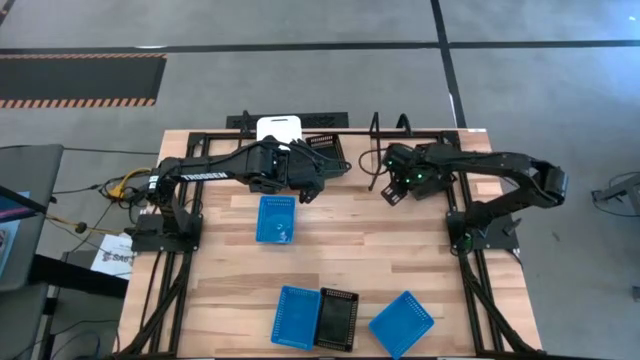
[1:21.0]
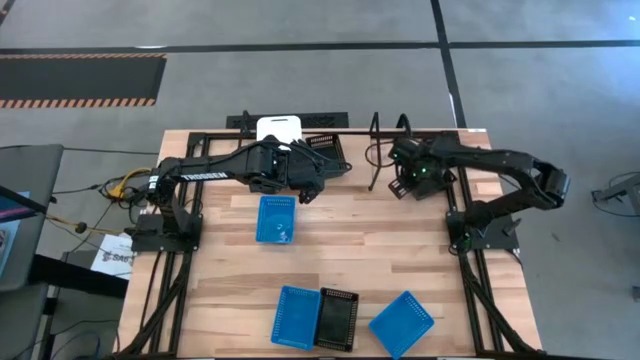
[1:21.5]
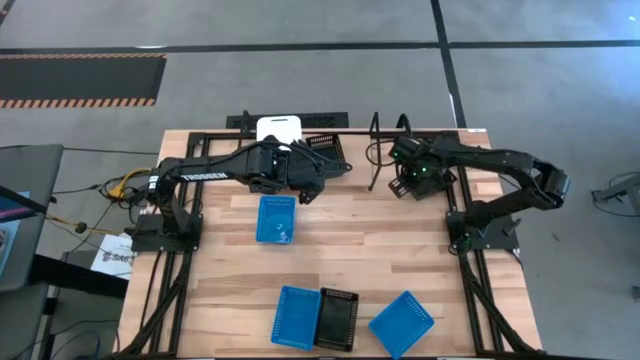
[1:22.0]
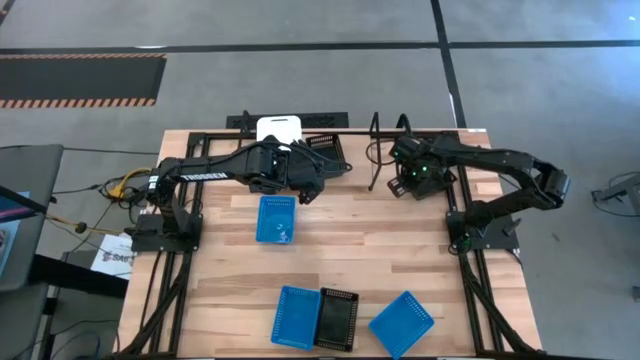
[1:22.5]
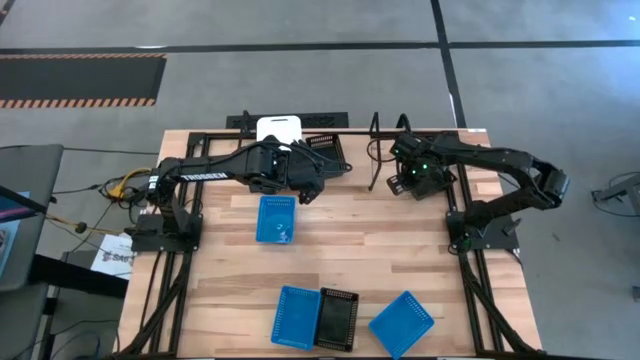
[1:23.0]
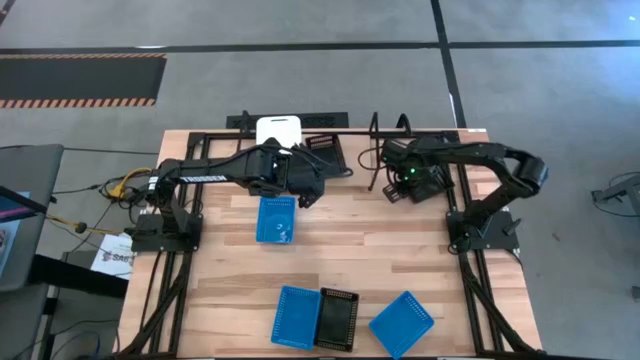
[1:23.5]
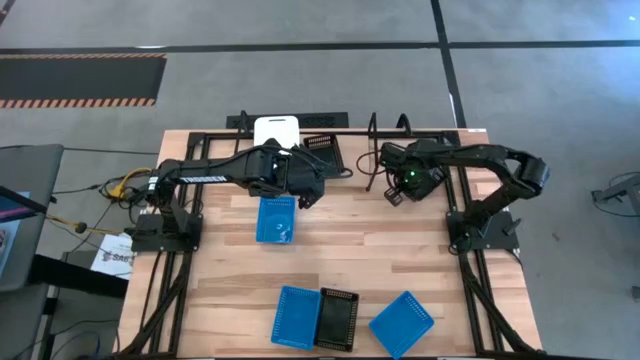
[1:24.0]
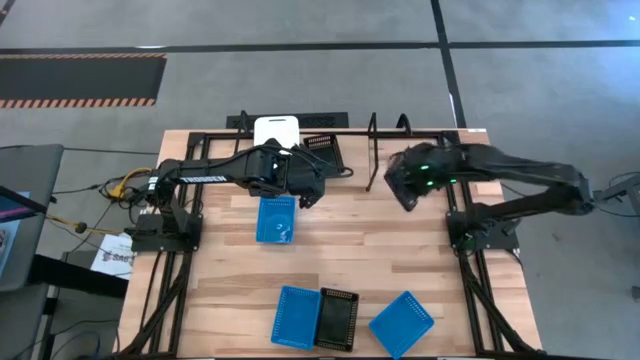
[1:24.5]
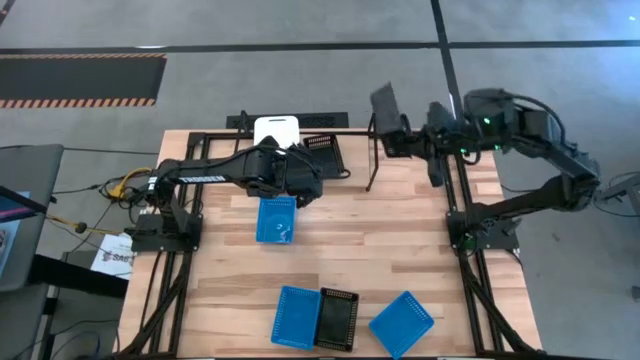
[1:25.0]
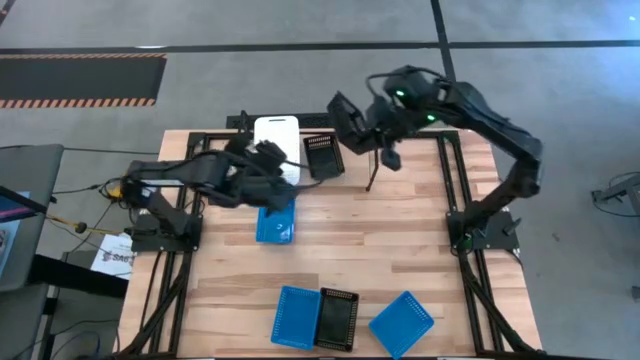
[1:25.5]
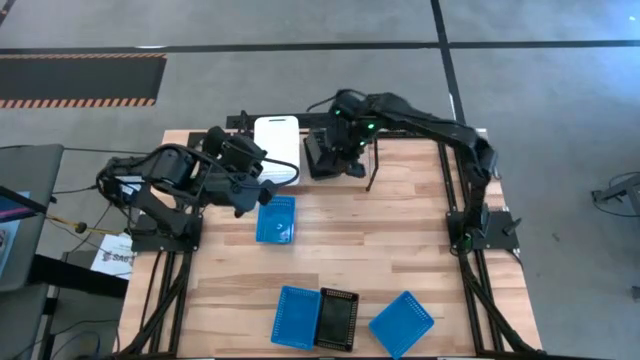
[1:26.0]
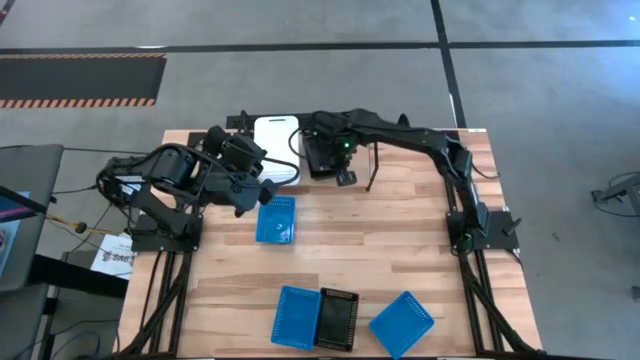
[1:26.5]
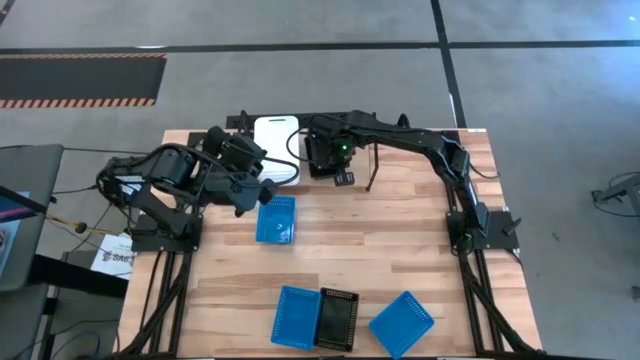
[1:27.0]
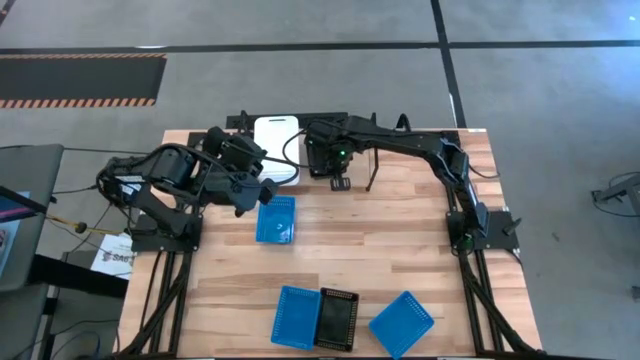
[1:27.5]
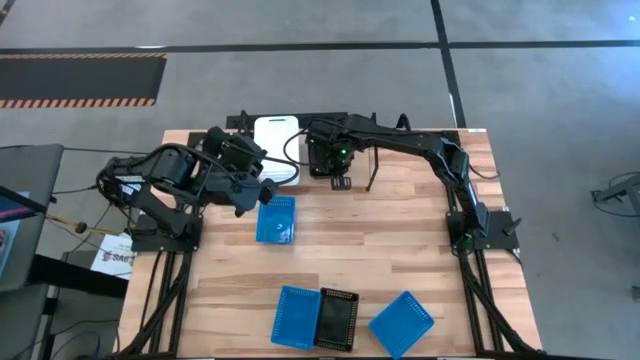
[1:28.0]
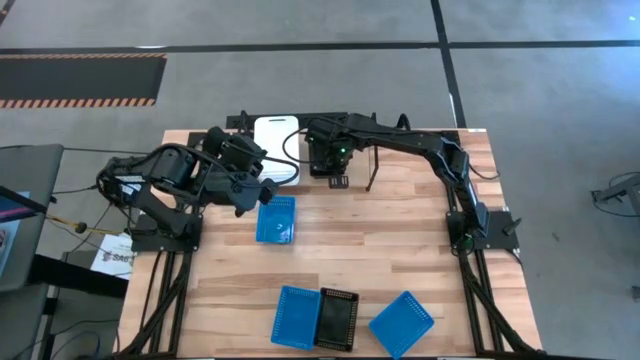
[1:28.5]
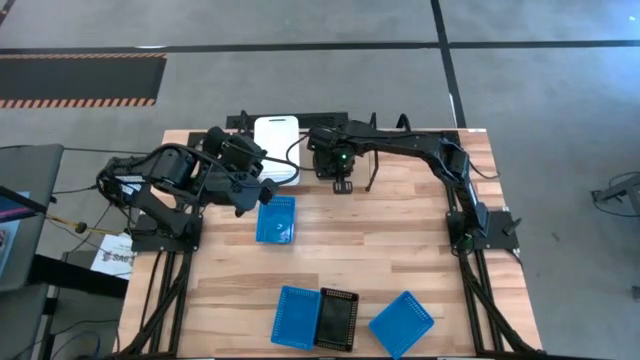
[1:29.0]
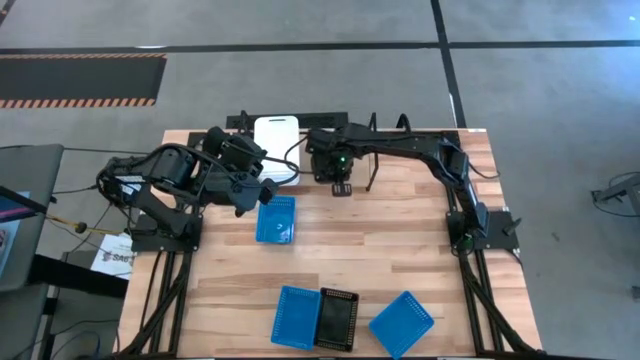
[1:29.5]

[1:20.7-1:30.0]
Task: Stack baskets on shelf by color
Stack the top black bin on top of the black bin on the shelf

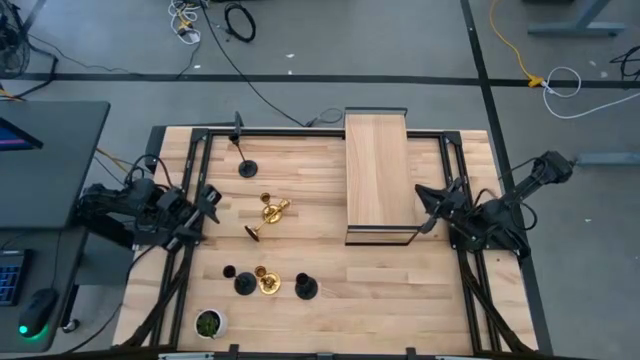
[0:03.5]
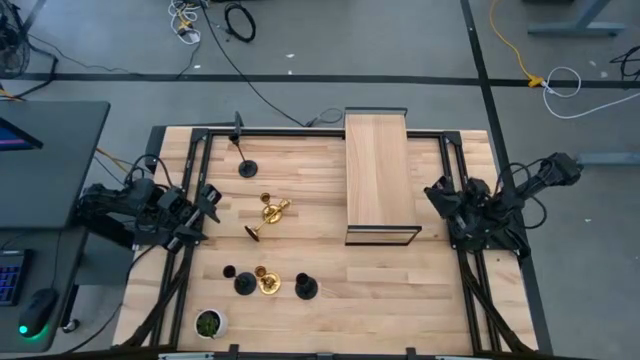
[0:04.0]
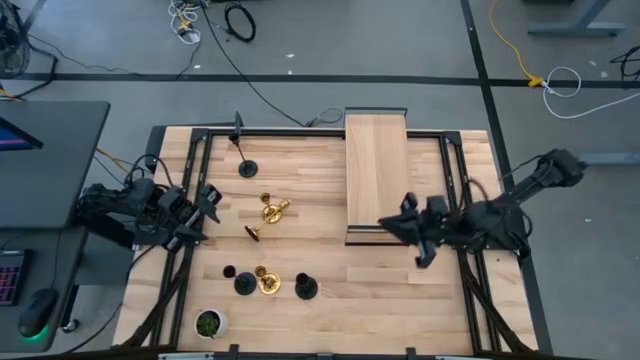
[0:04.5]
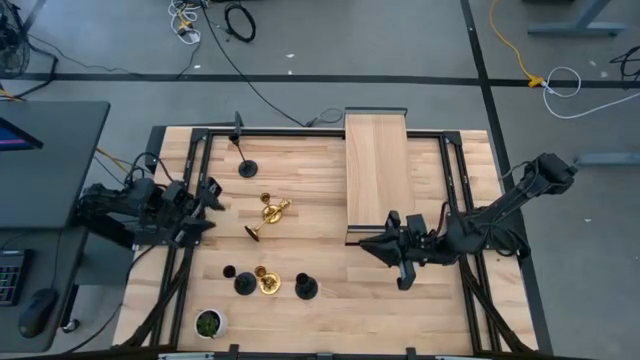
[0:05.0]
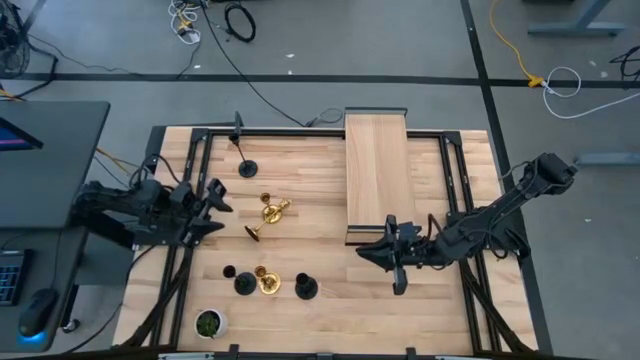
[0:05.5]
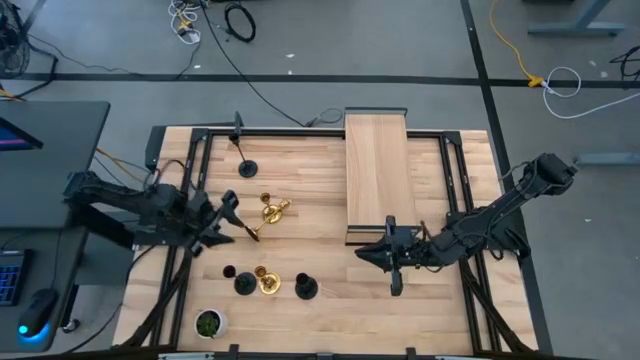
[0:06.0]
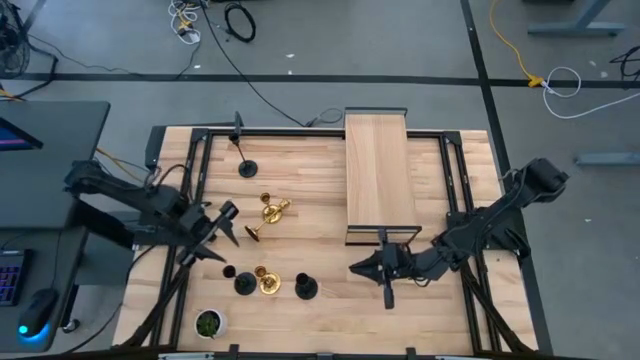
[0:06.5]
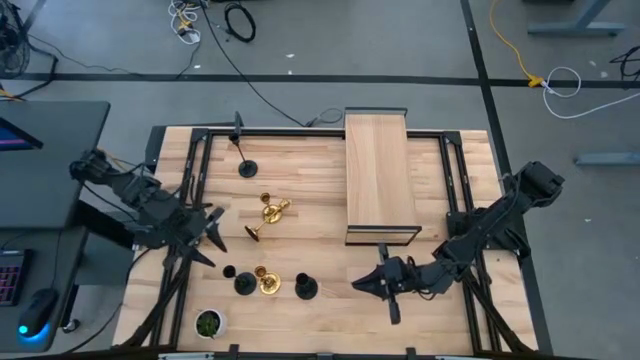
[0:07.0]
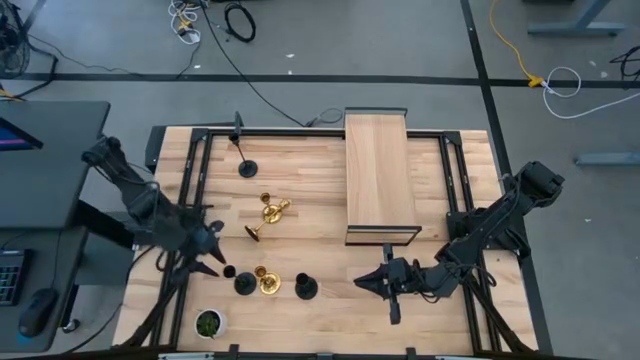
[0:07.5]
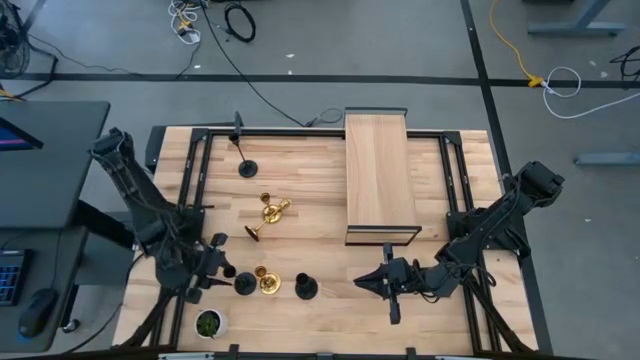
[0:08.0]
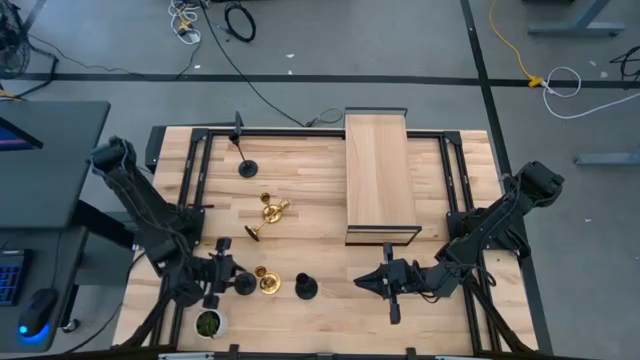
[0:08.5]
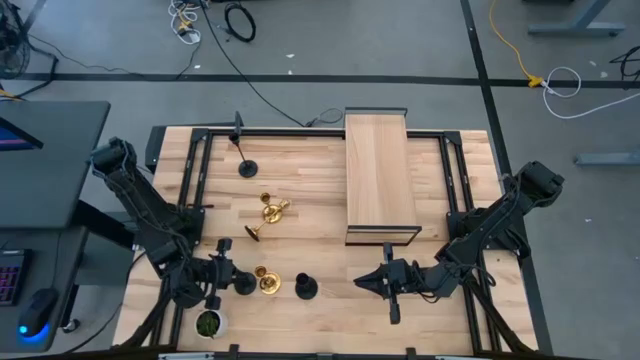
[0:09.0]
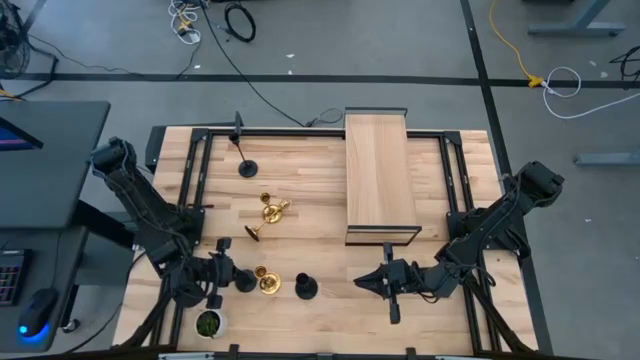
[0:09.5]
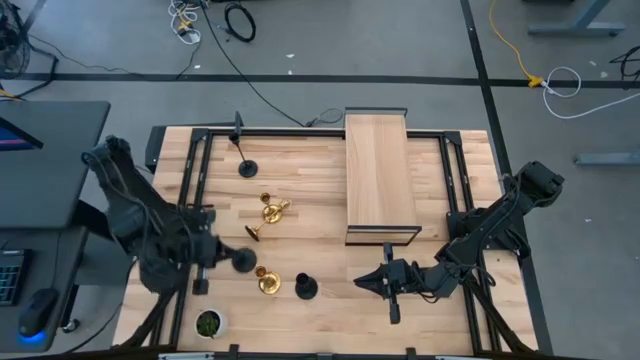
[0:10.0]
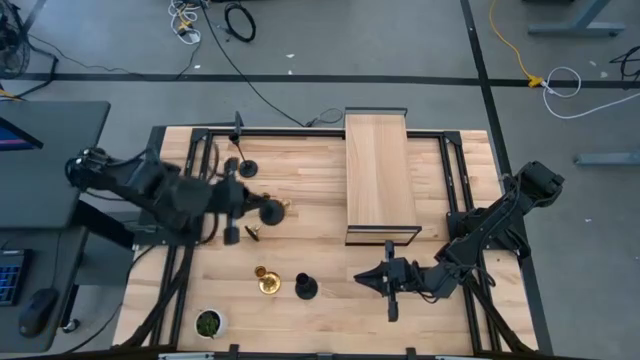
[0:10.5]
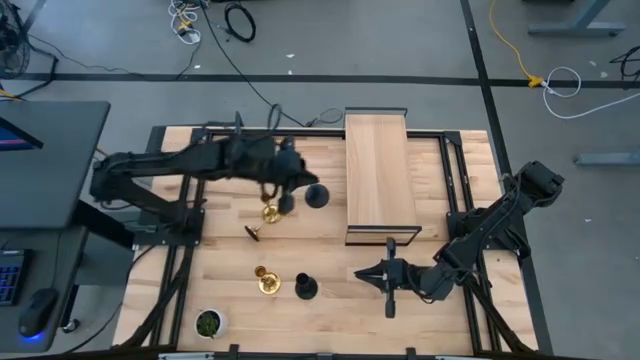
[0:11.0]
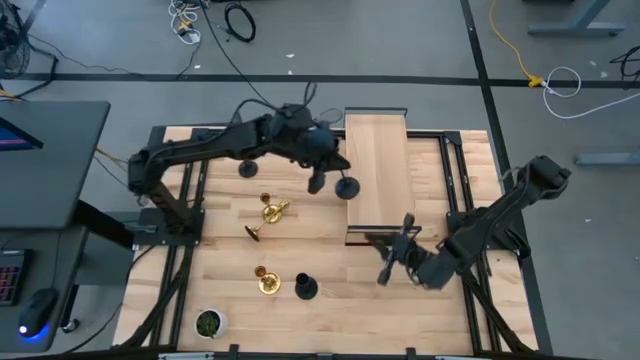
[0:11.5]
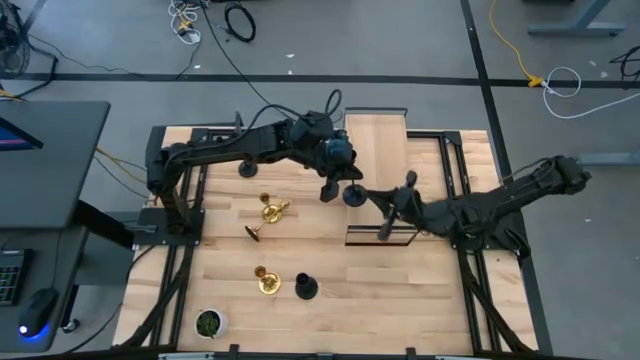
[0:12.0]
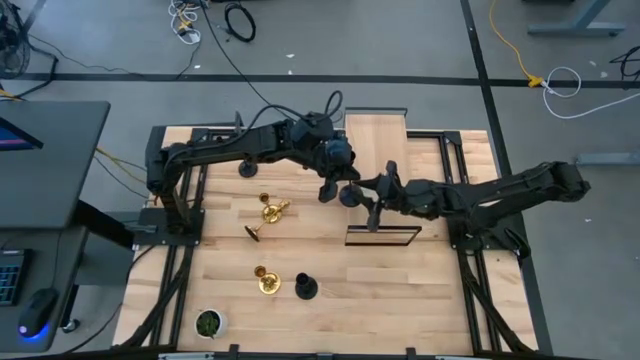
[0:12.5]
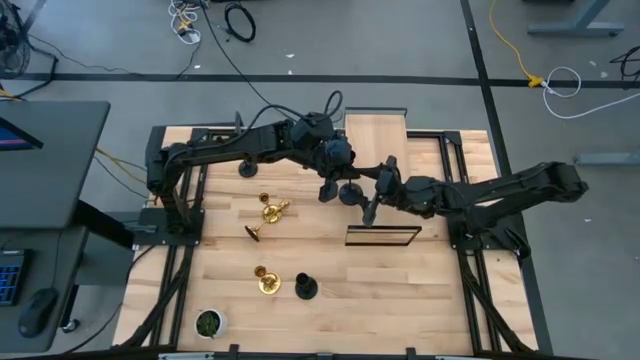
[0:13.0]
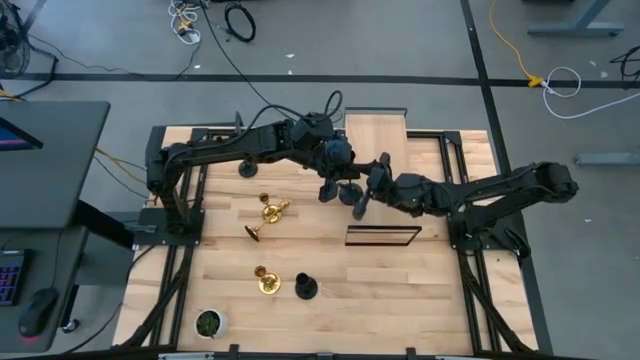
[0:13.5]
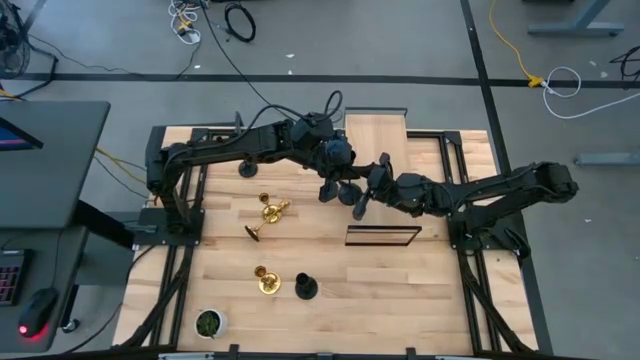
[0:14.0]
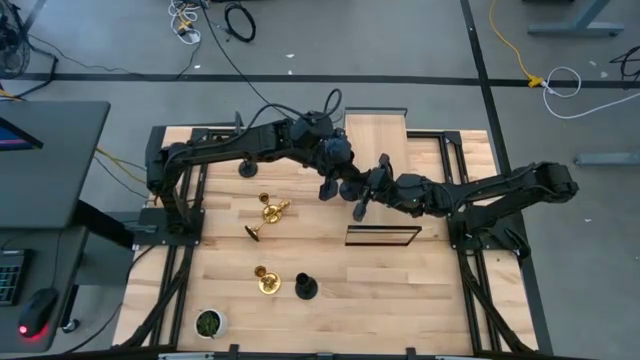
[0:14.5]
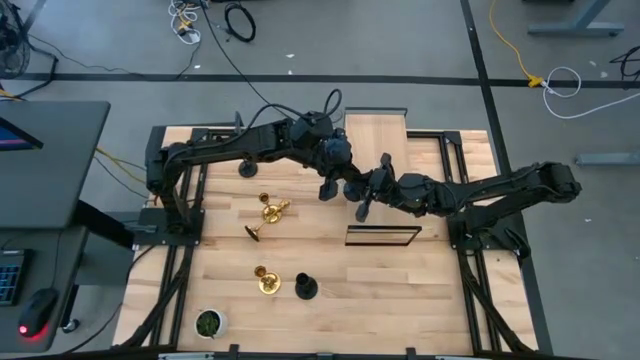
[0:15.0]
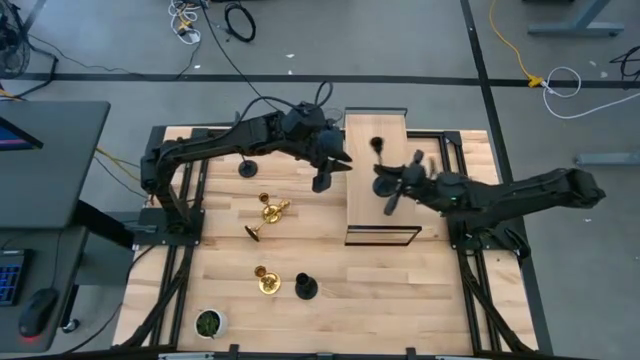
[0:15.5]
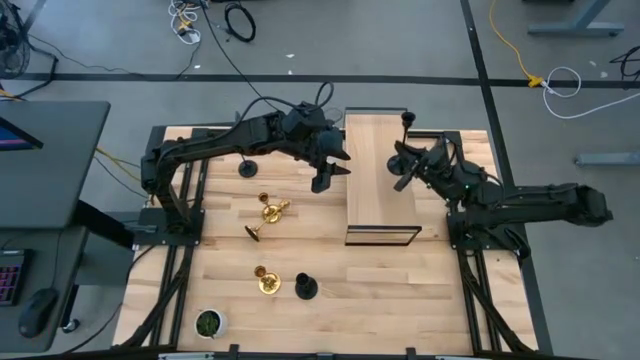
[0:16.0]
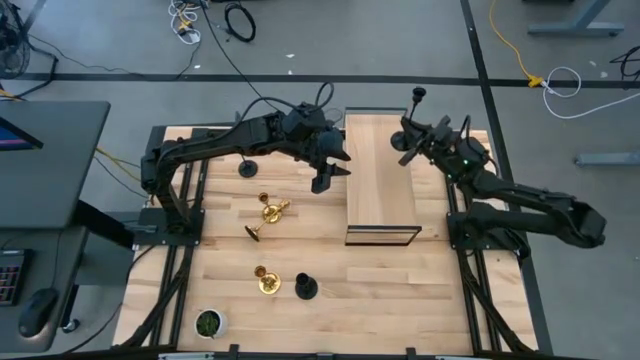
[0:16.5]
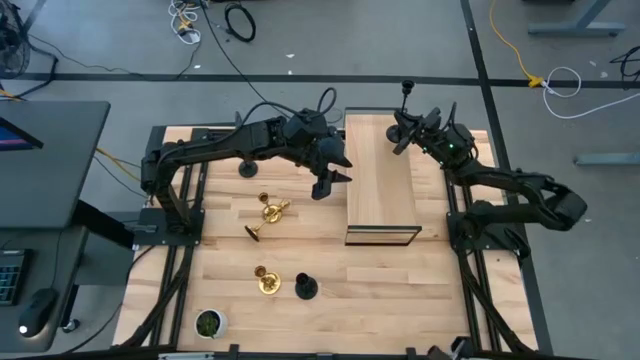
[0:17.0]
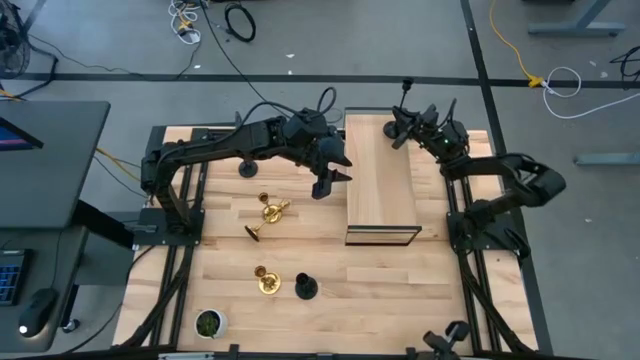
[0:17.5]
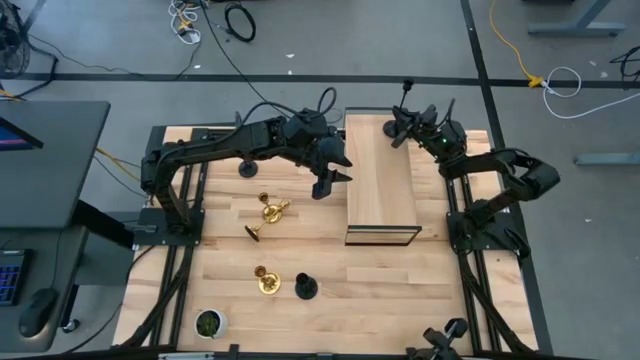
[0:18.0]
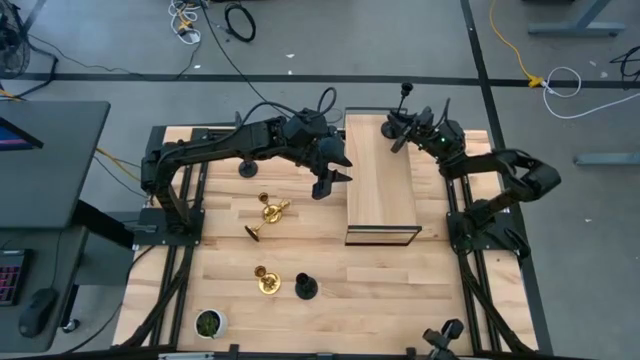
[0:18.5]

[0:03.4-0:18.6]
Task: Pick & Place candle stick holders
Put the bottom left black candleholder on the shelf
